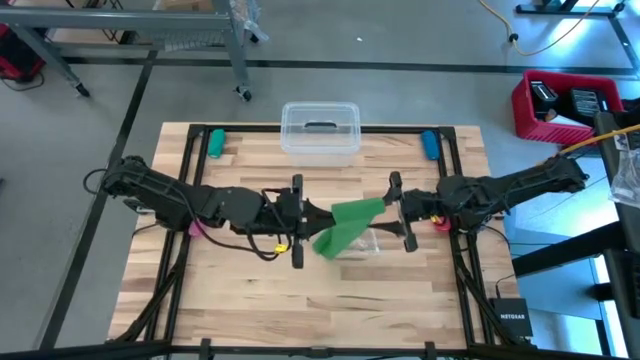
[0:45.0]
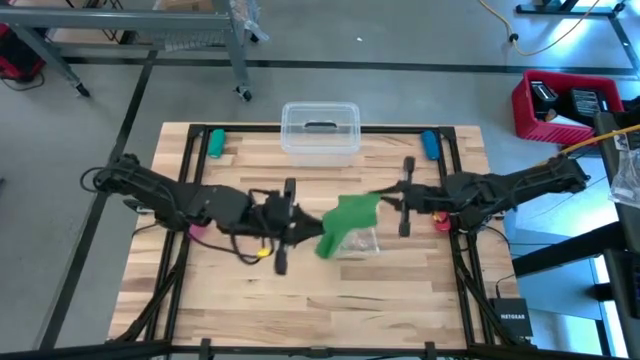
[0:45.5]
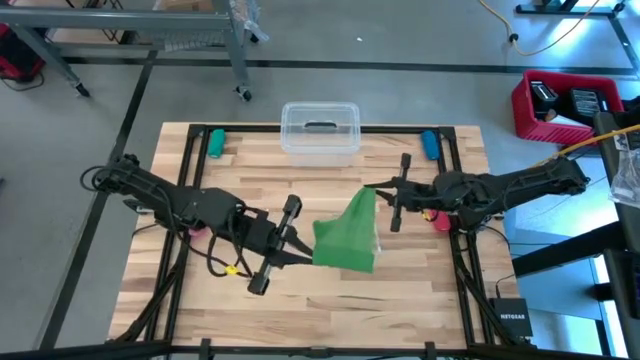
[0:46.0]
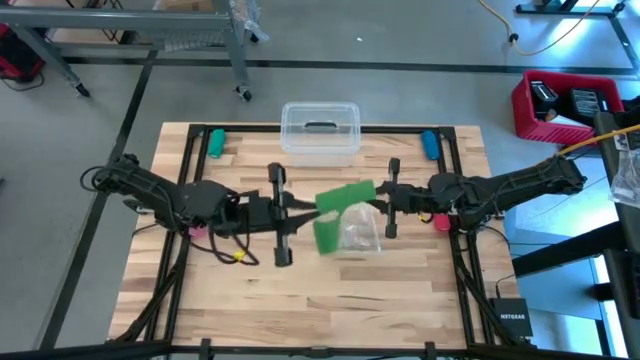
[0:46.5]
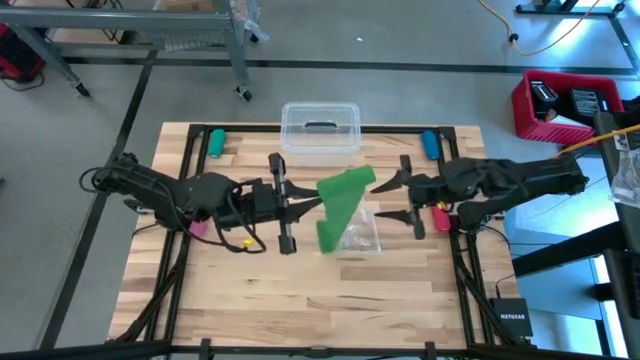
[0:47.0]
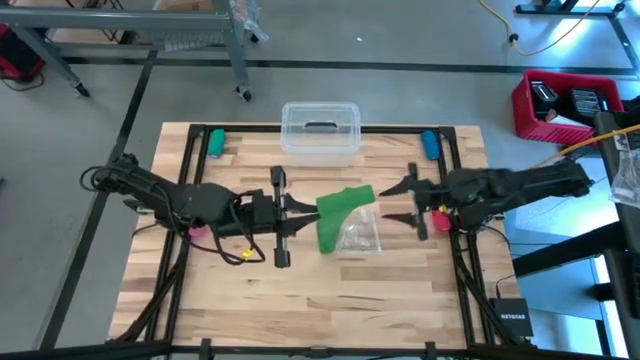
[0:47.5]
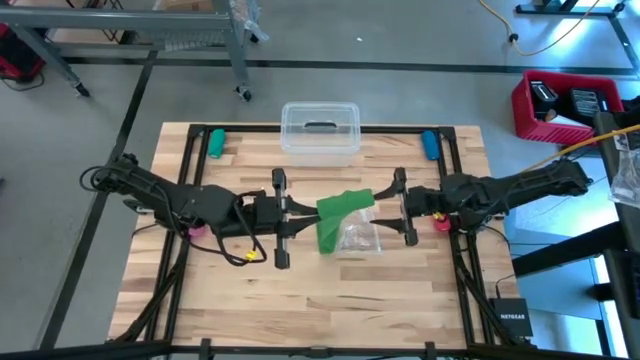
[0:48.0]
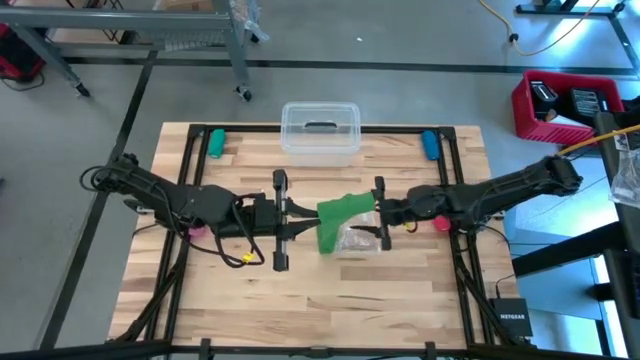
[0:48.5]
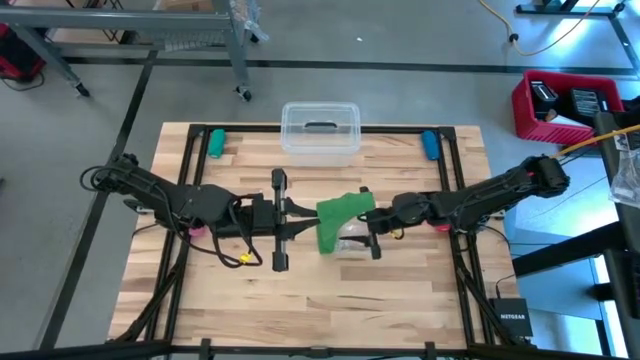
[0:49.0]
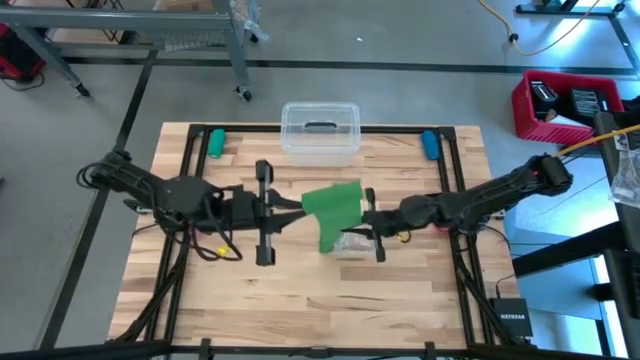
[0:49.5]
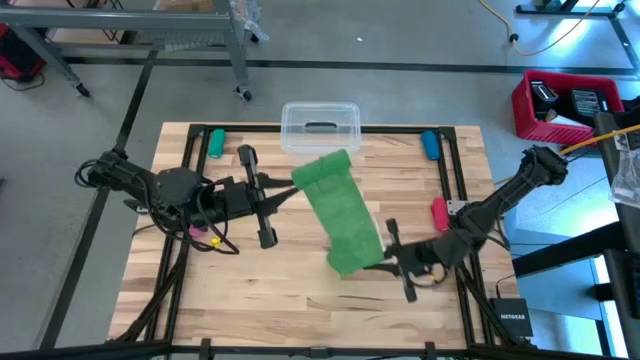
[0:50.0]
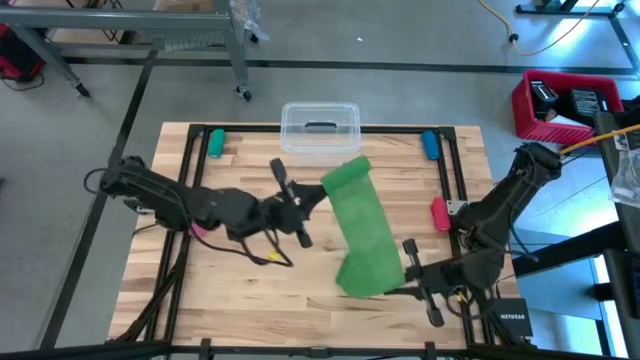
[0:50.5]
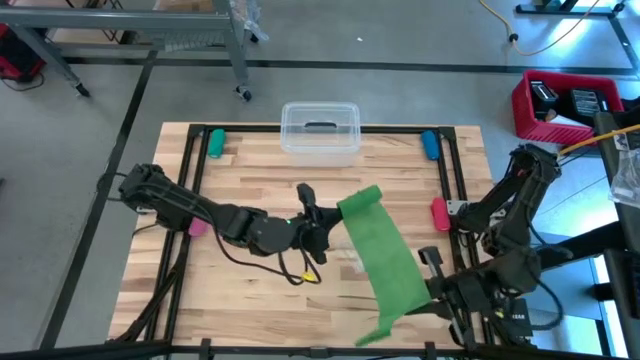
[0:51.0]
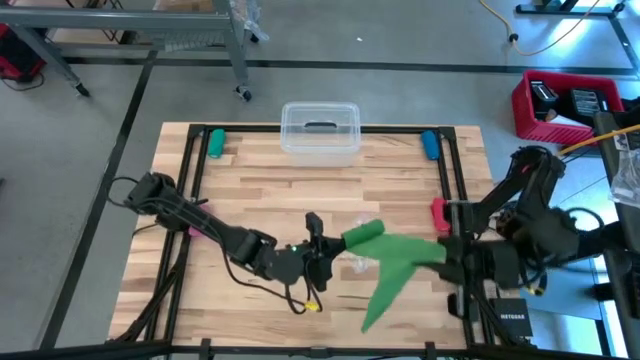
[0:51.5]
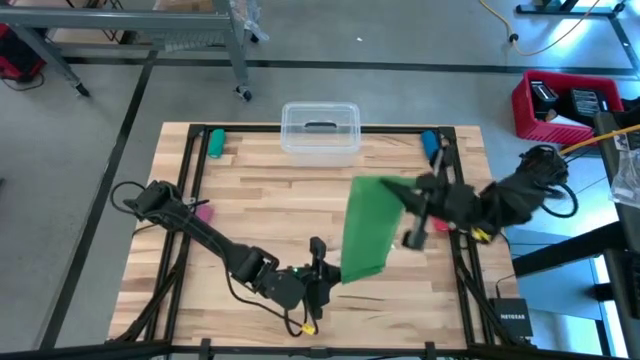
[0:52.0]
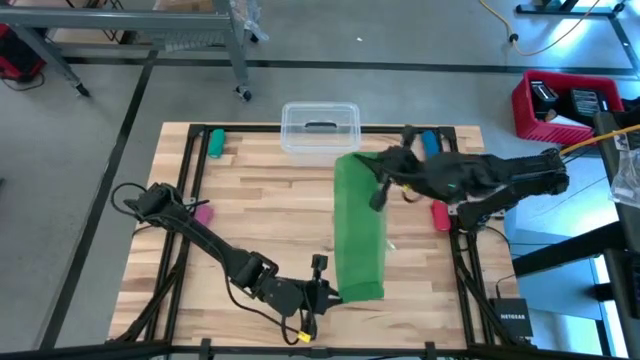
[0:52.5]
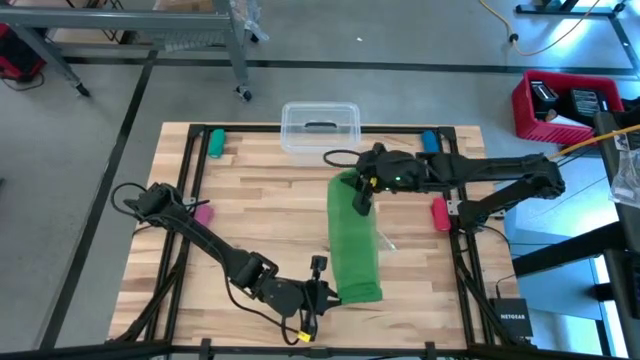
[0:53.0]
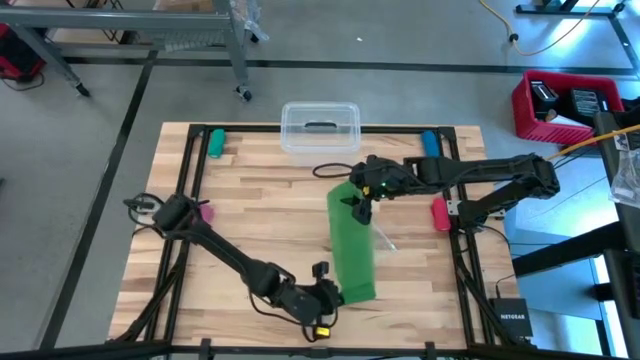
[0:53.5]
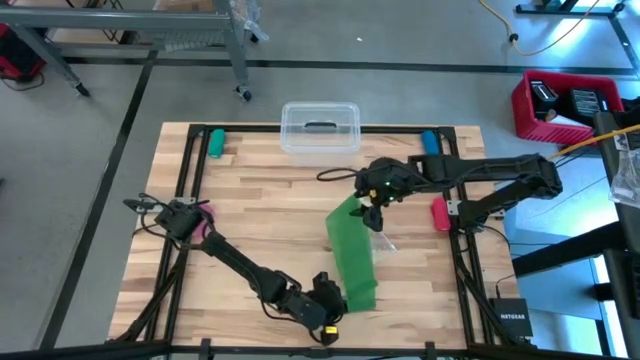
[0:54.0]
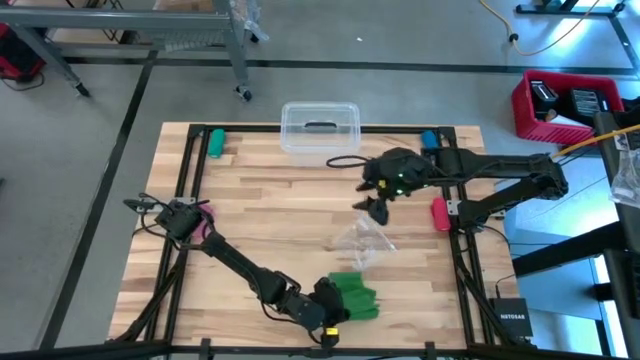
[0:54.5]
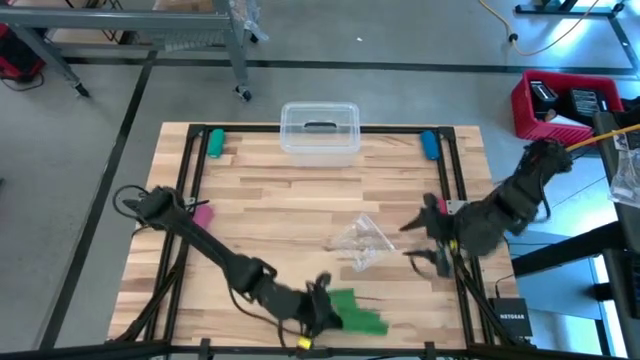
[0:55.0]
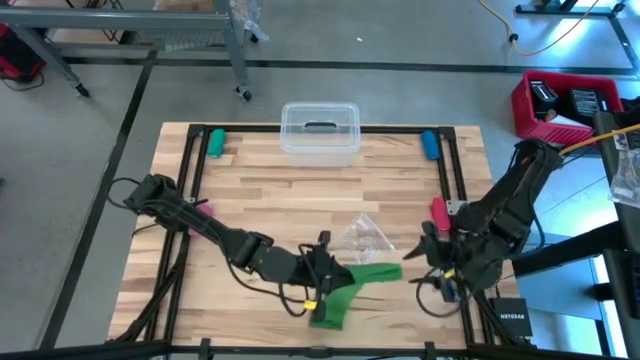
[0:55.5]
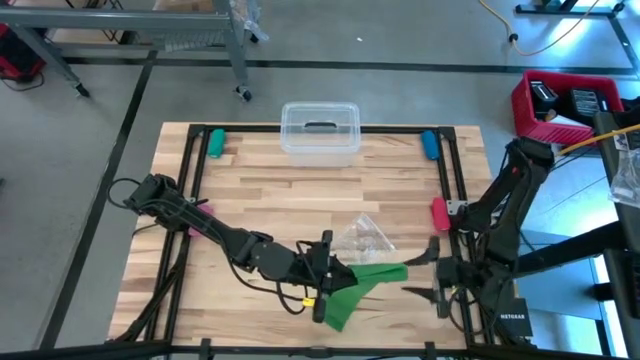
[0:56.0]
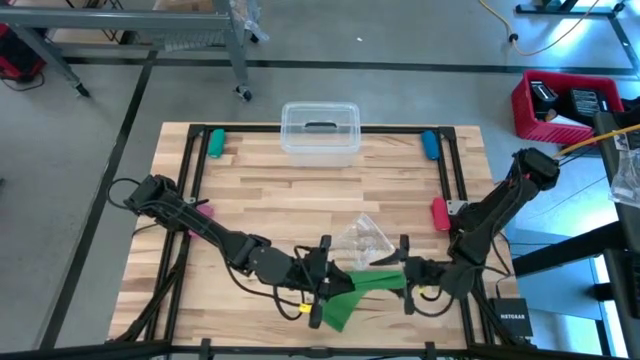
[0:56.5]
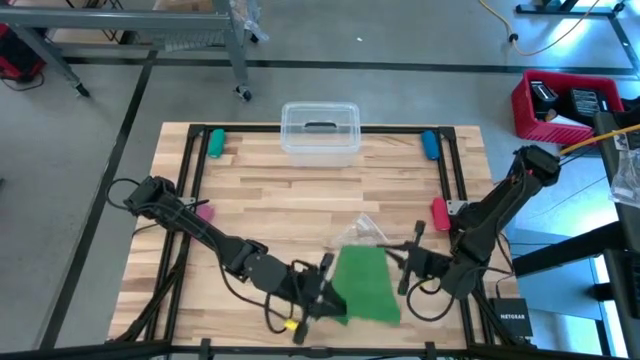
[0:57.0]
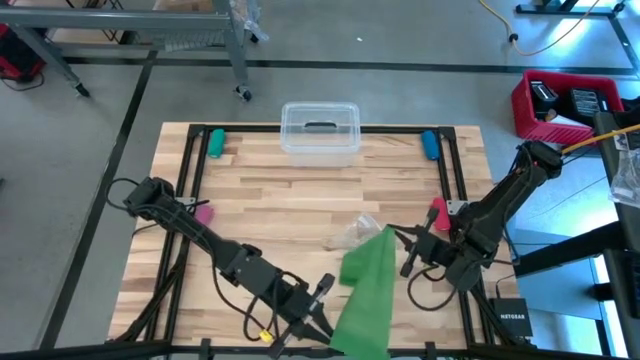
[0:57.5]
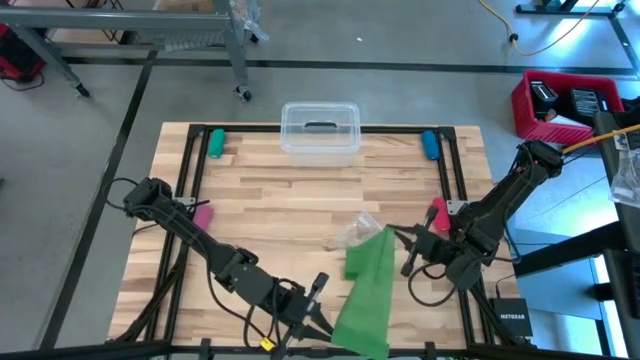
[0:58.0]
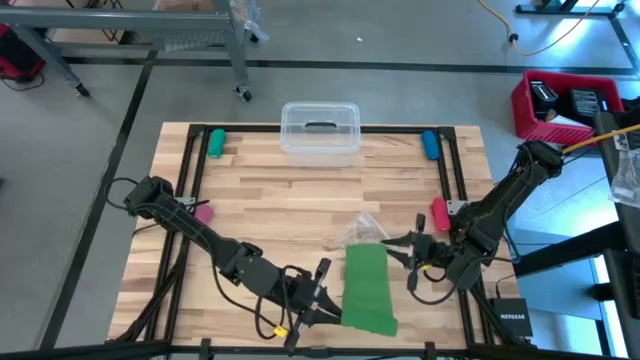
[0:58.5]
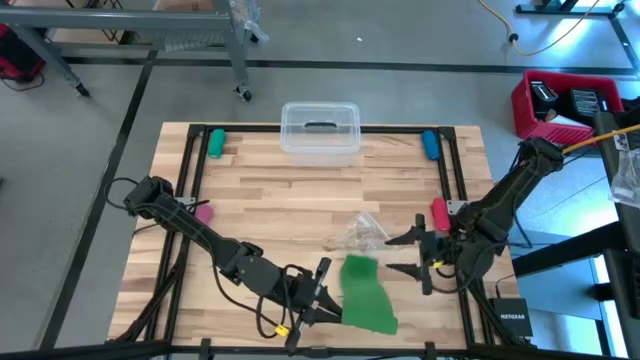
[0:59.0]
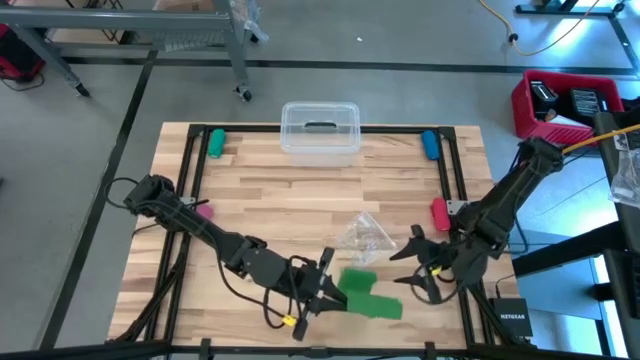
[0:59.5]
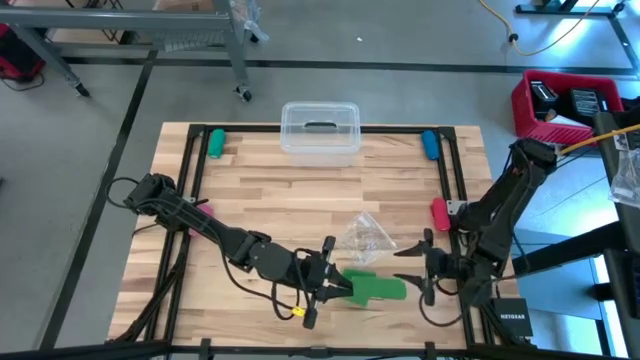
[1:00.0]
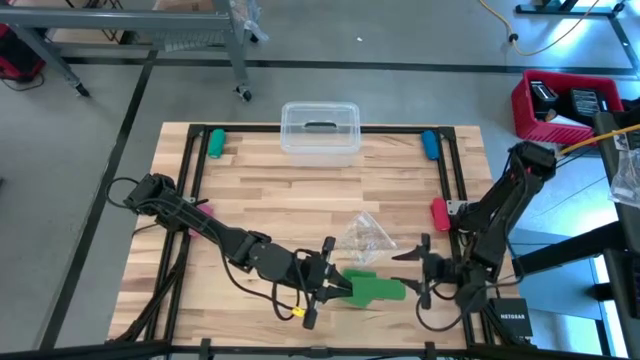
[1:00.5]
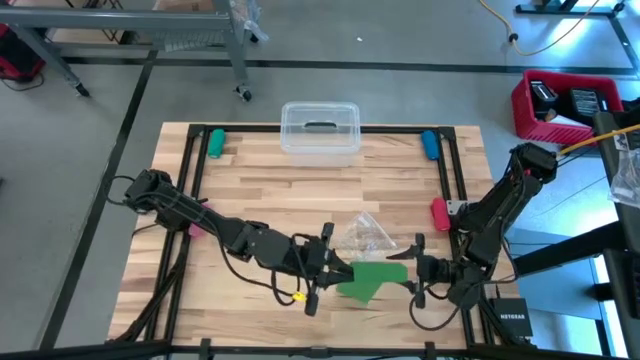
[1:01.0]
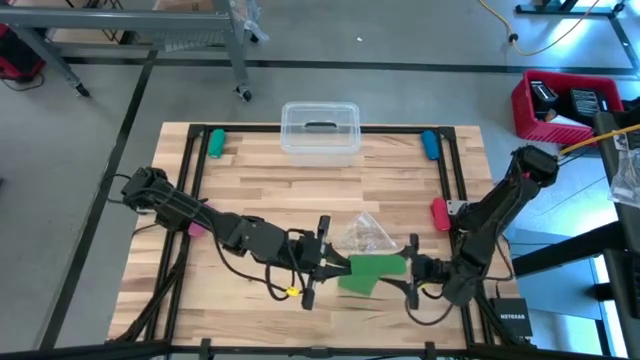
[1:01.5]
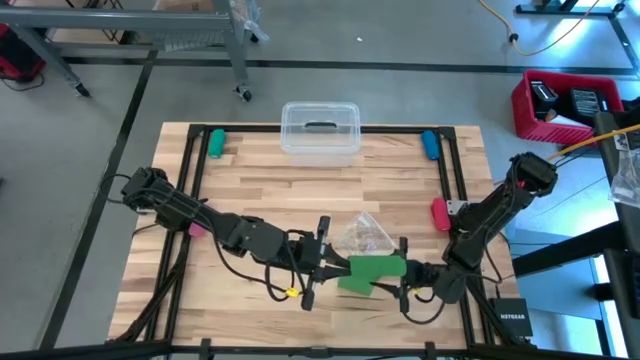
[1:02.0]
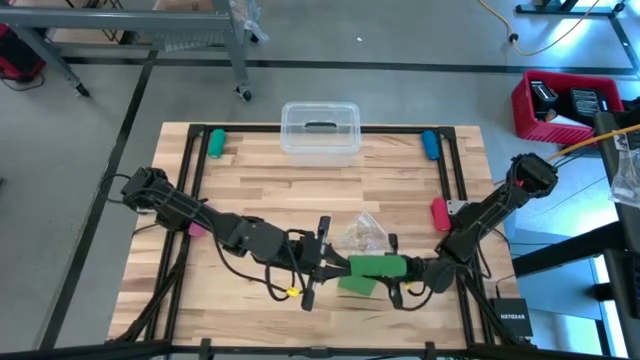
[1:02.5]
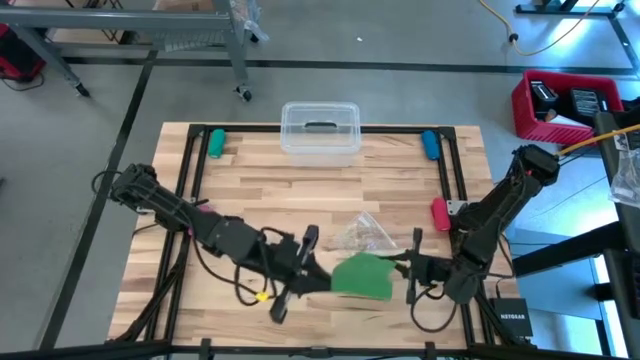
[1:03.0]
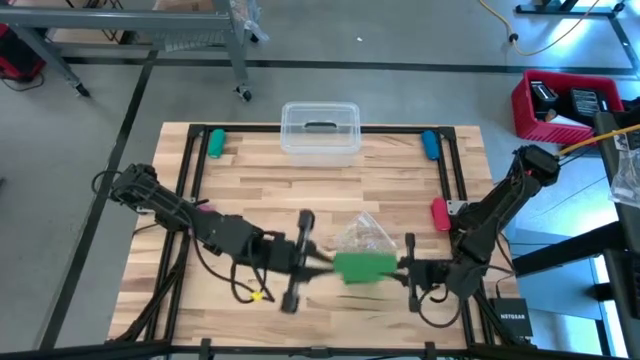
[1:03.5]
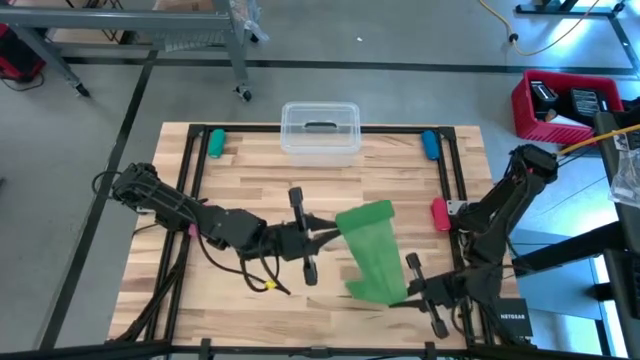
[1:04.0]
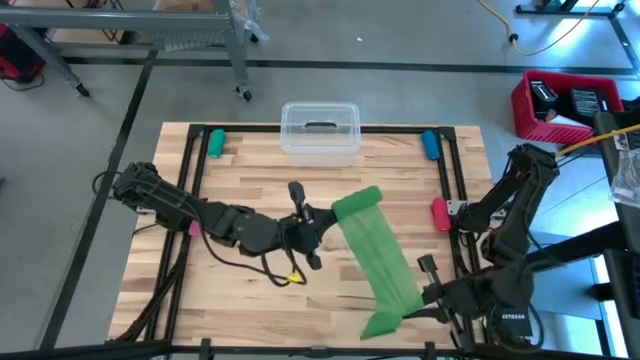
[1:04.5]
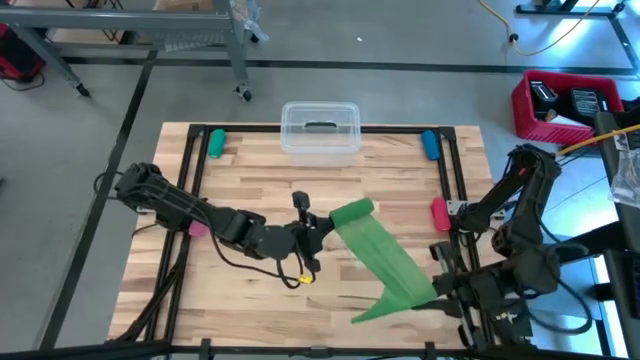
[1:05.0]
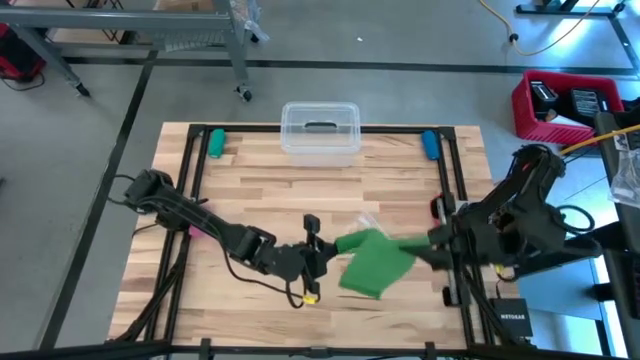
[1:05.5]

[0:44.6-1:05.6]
Task: Roll bandage
Roll the green bandage

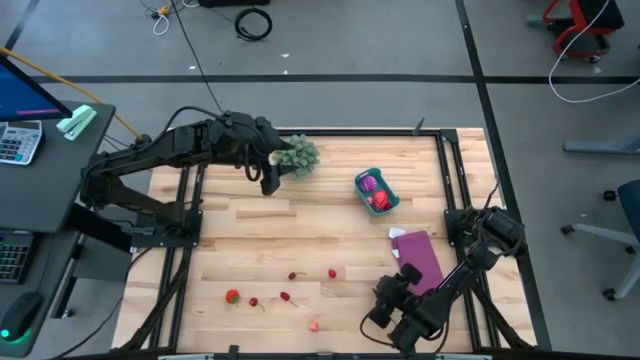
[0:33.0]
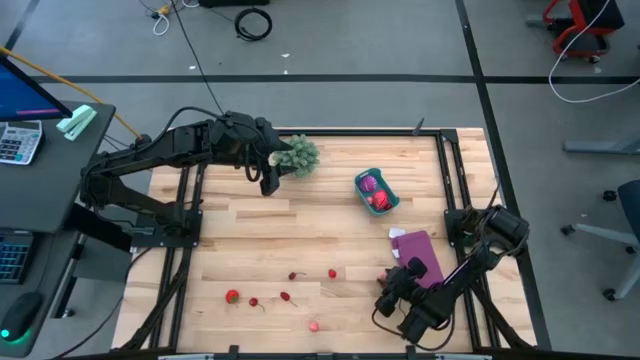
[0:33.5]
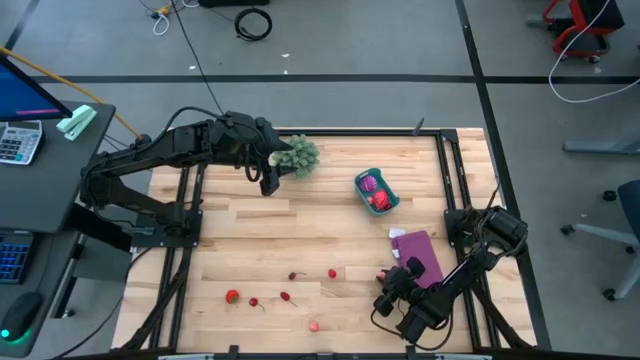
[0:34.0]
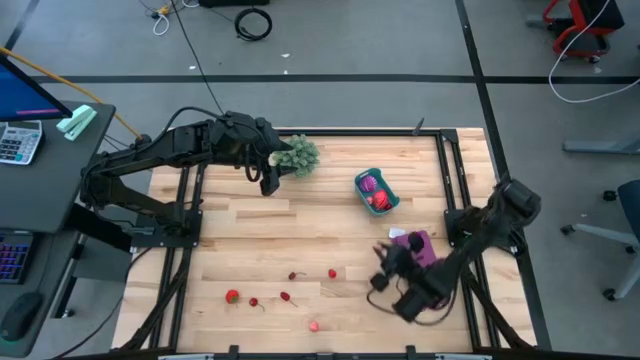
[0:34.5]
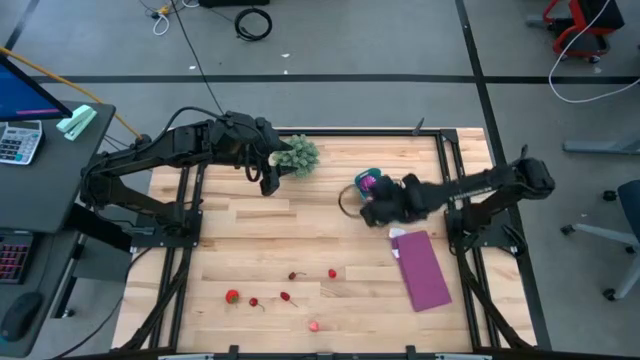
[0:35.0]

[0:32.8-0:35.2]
Task: Pick and placing Produce into tupperware
Put the pink peach into the blue bin
